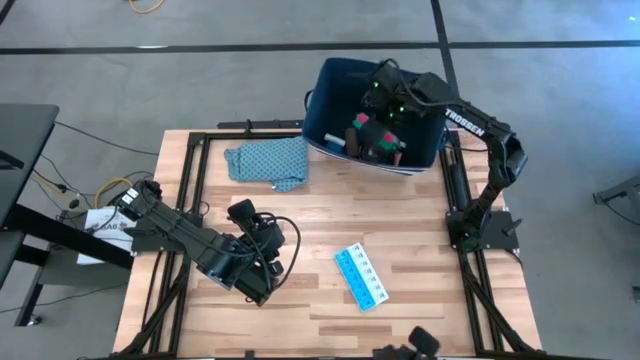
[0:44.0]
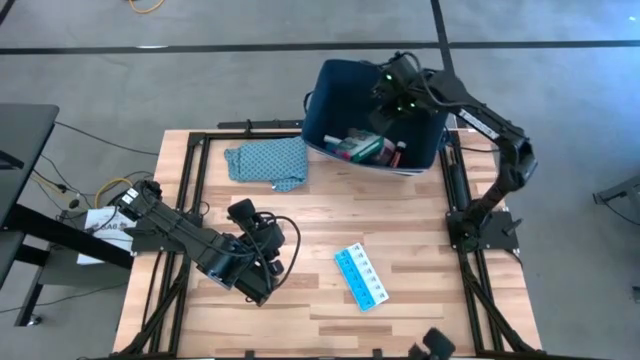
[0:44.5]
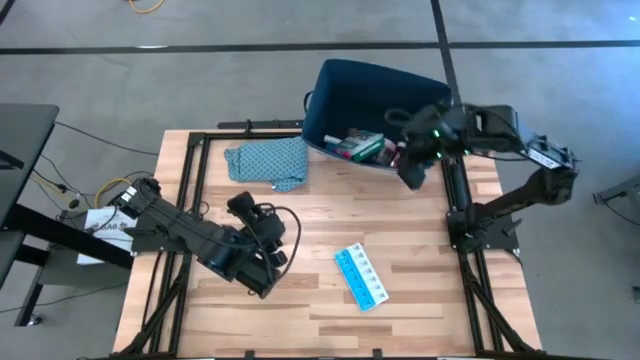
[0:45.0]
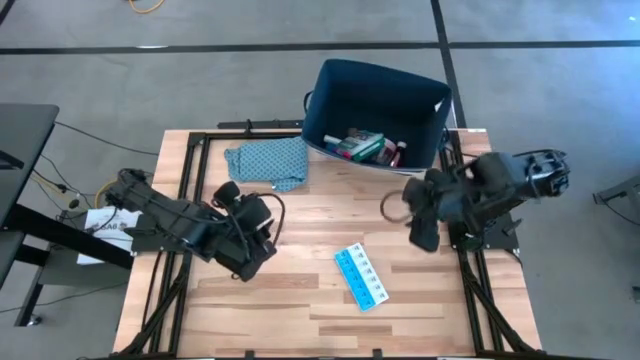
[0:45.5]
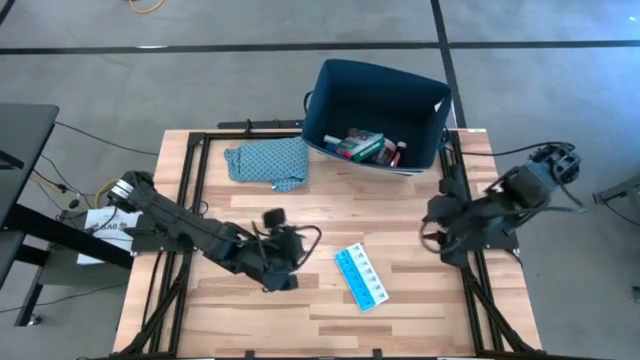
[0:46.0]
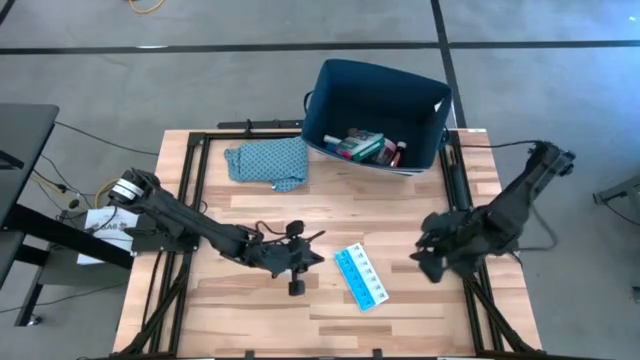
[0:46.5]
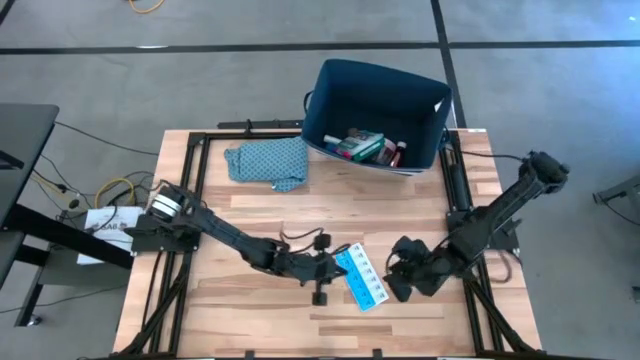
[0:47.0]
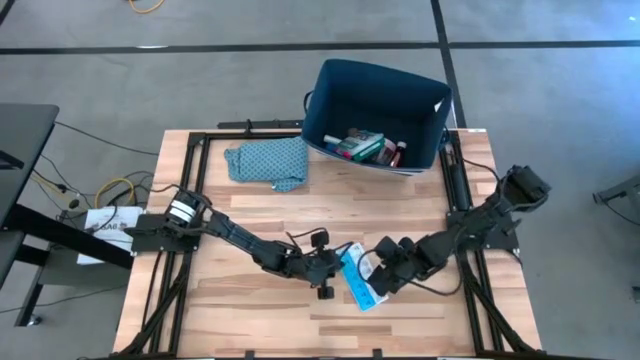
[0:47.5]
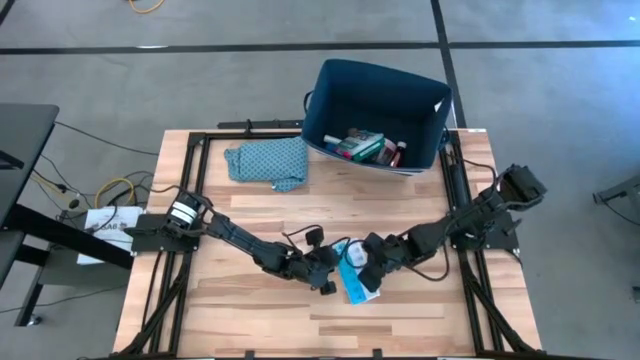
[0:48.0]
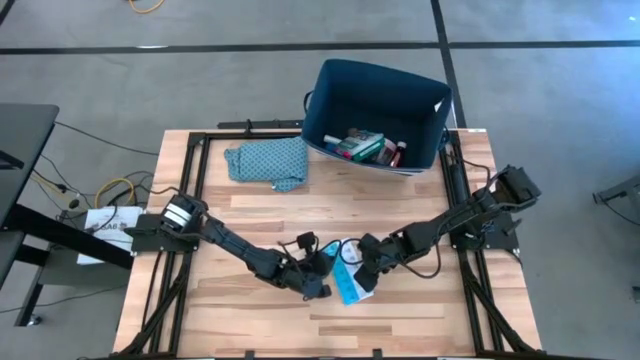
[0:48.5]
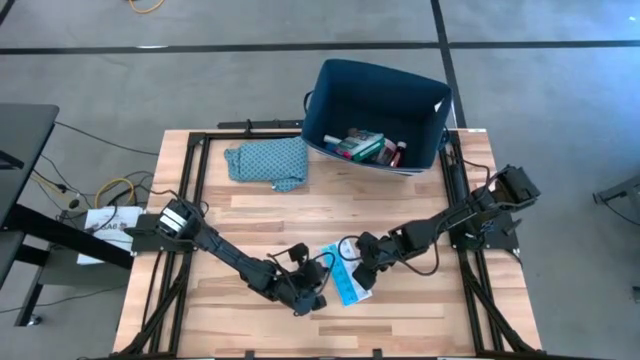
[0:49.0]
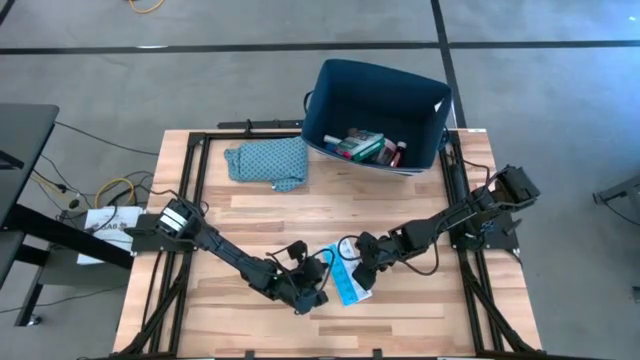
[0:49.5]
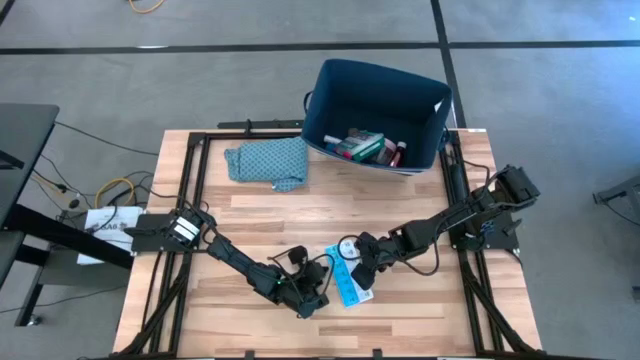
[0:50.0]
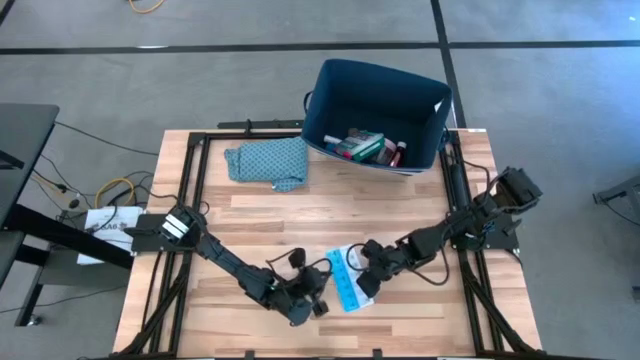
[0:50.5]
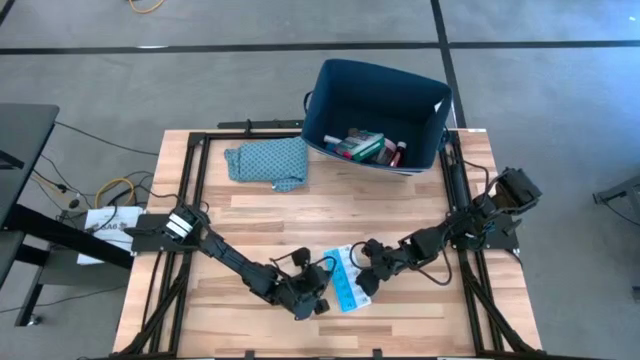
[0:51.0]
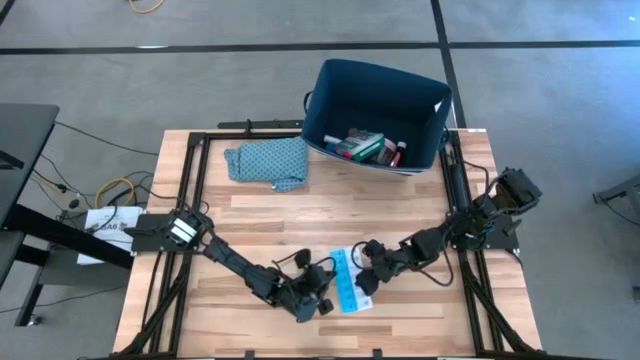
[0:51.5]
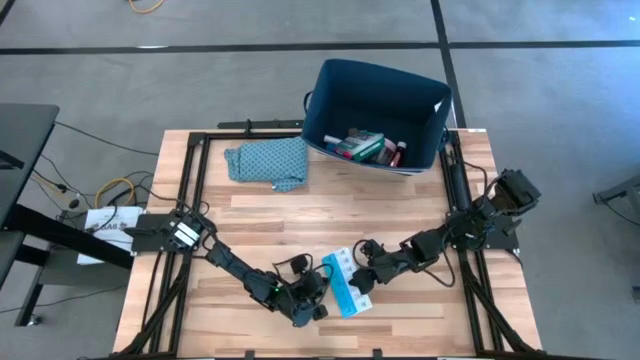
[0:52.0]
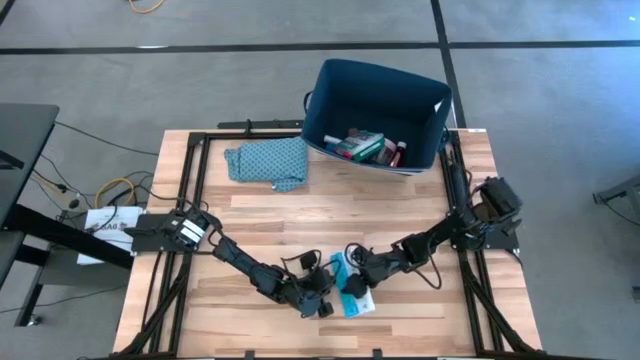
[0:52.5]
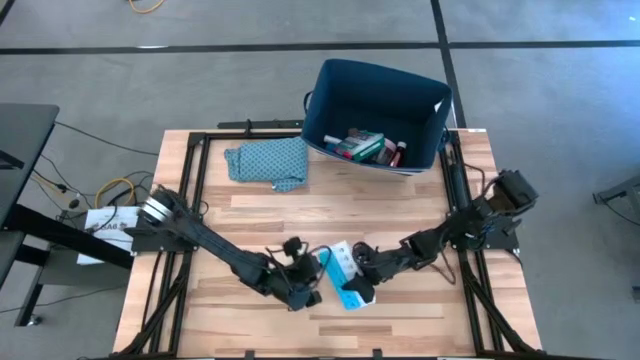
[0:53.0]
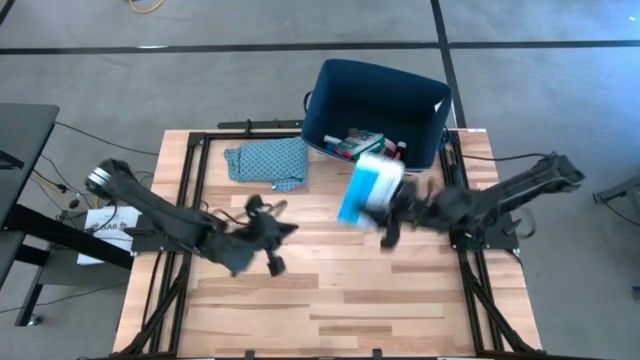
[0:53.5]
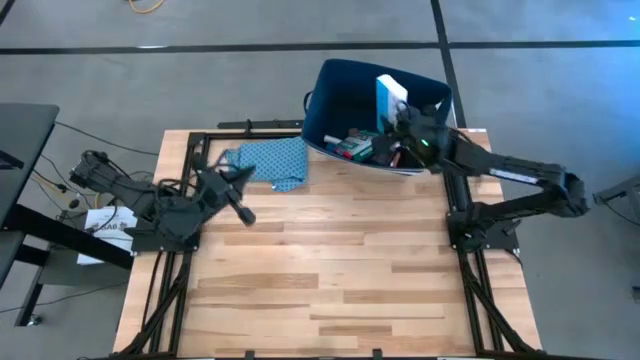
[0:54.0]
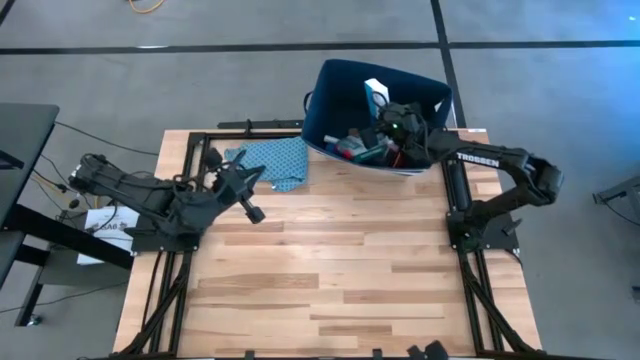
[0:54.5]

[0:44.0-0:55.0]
Task: Pick & place medical supplies in basket/bin
Put the white and blue medicine organizer into the blue bin

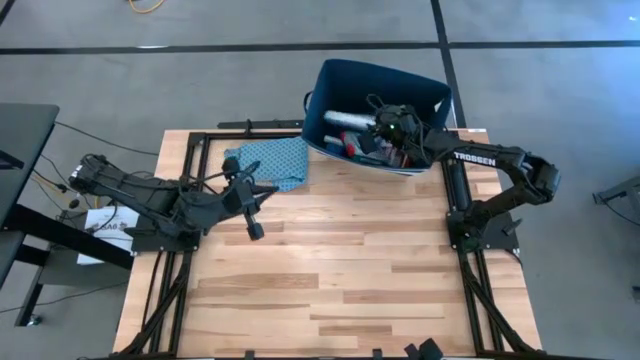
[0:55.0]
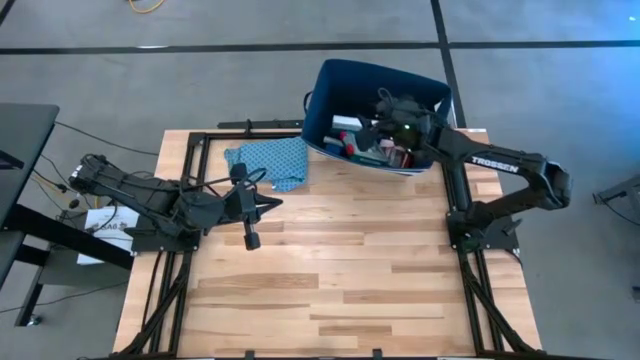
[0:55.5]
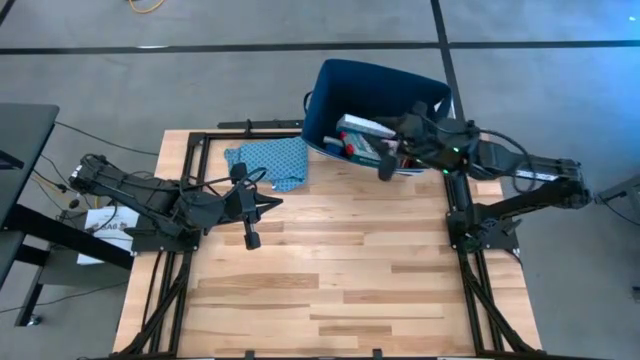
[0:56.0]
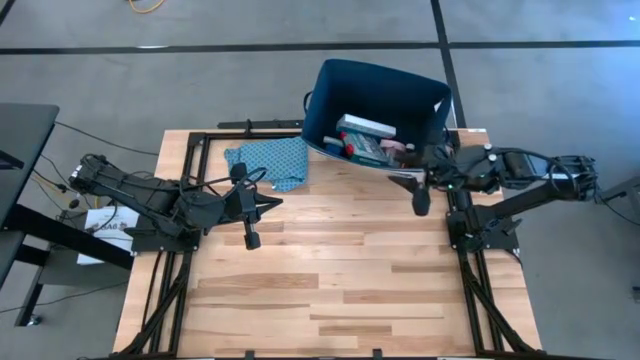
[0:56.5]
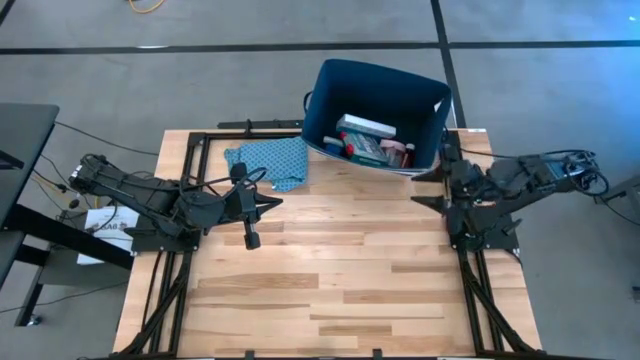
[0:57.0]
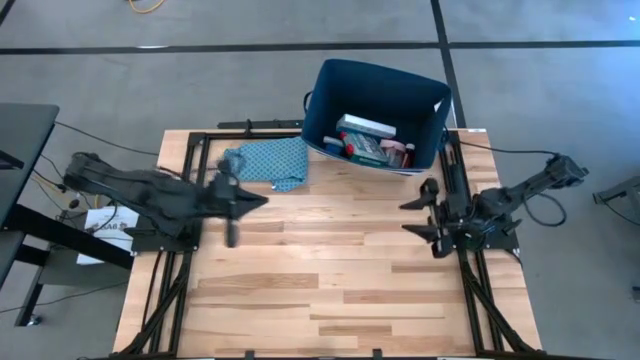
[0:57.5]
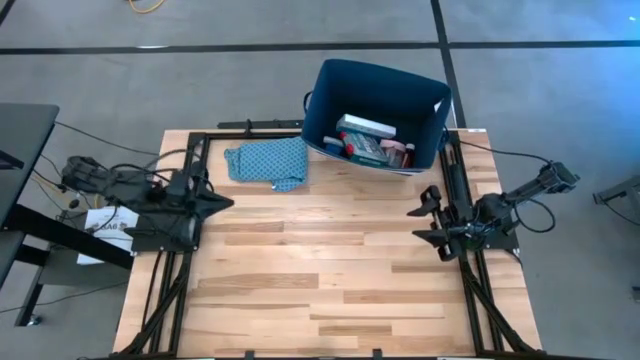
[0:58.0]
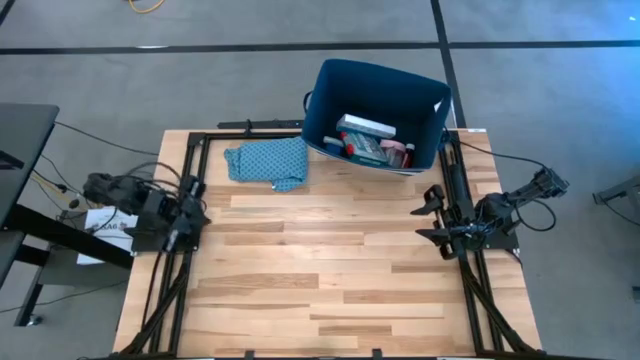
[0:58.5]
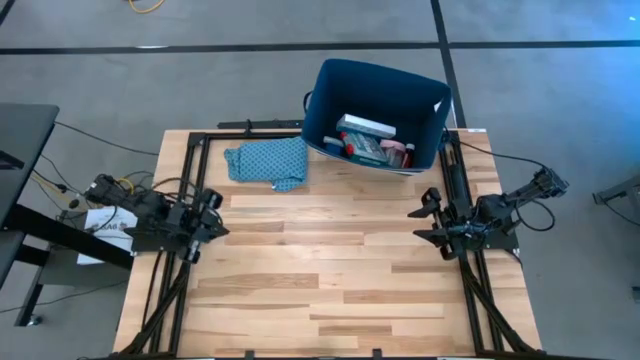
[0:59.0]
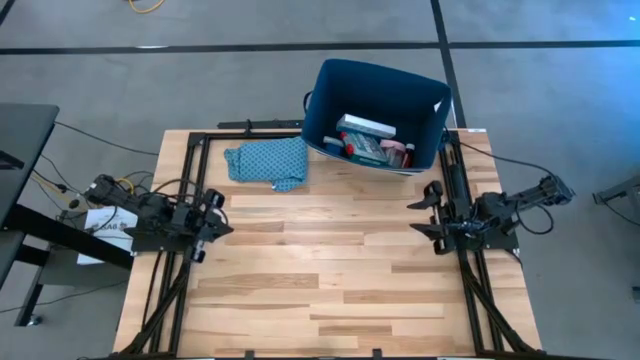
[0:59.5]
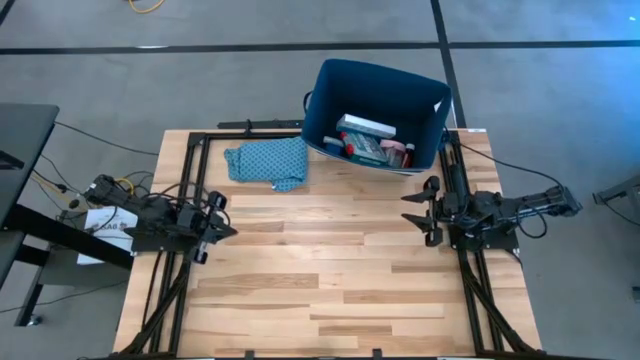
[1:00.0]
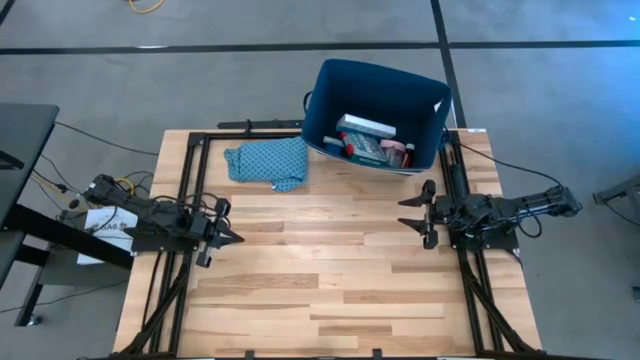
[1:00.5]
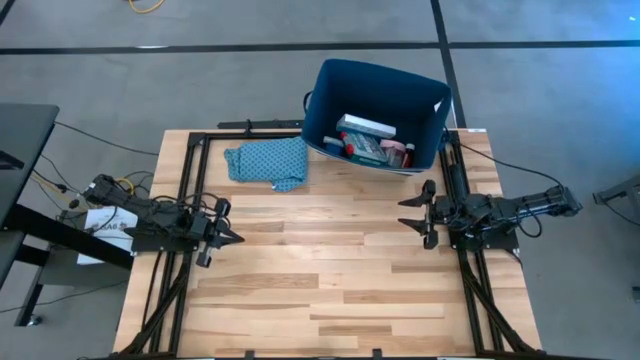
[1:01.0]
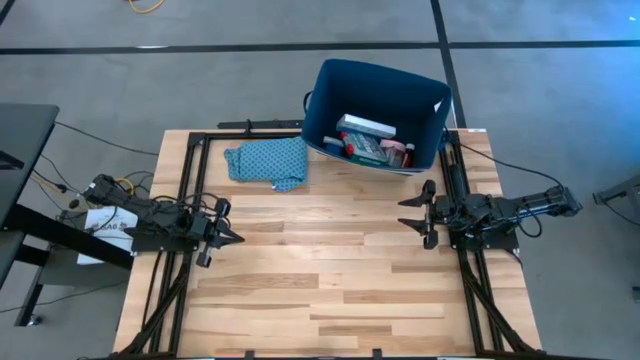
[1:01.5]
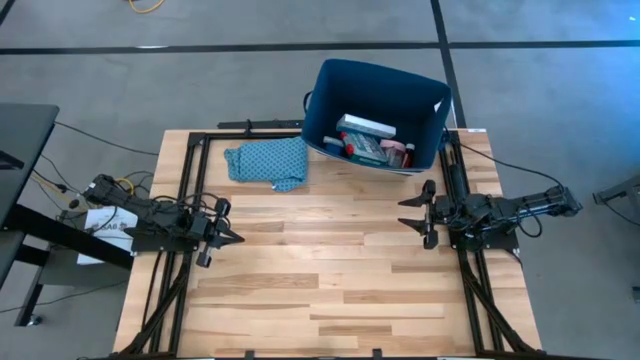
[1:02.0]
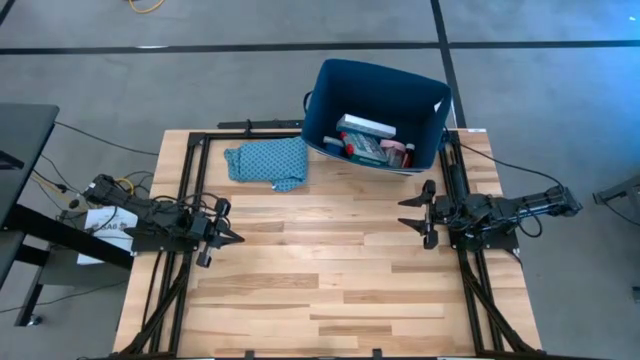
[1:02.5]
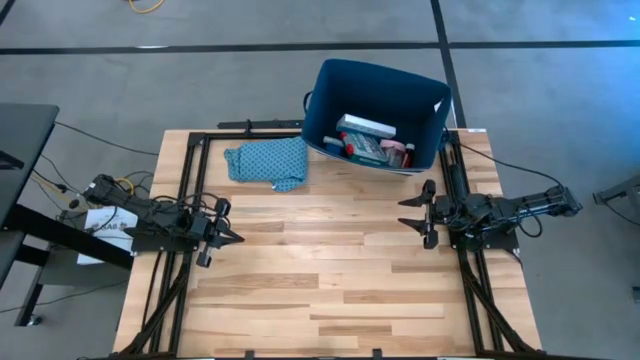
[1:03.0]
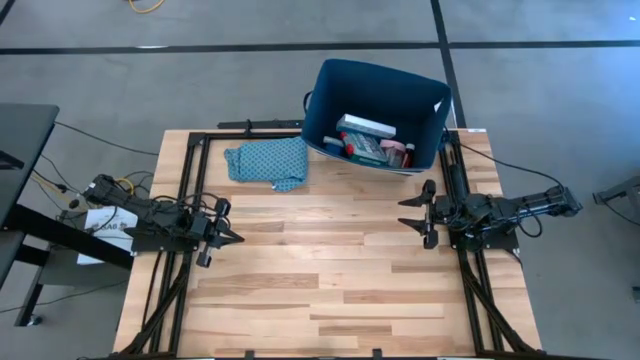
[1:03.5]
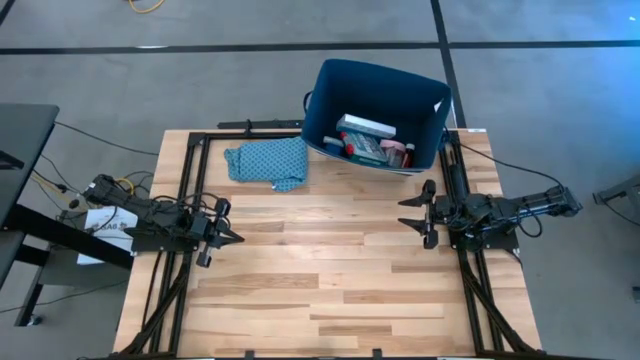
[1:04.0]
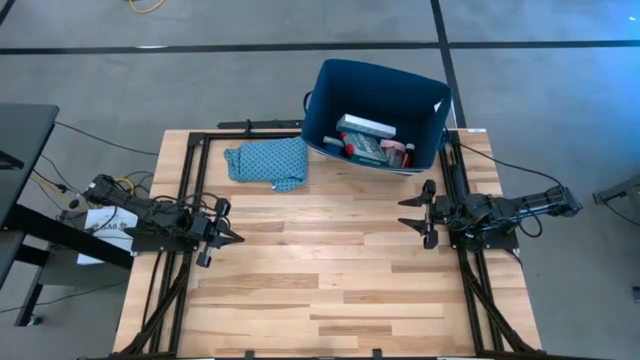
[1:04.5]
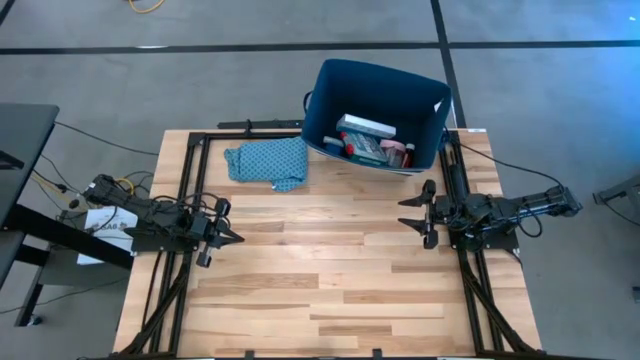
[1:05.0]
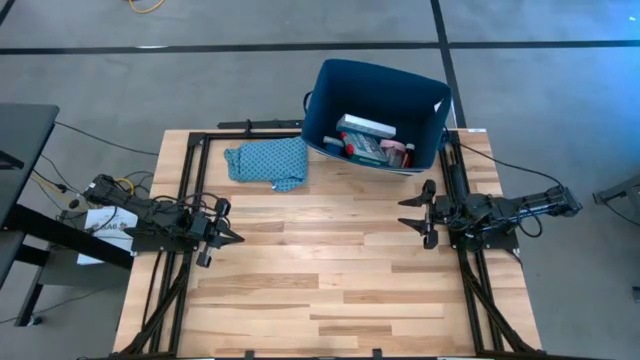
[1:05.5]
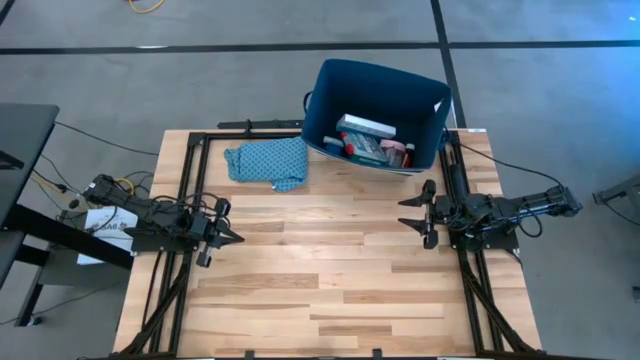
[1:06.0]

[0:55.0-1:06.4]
Return to Home Position
